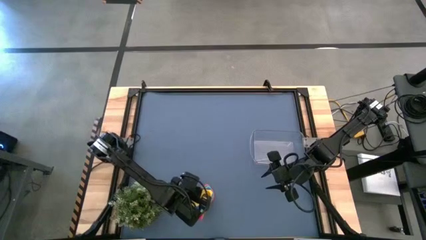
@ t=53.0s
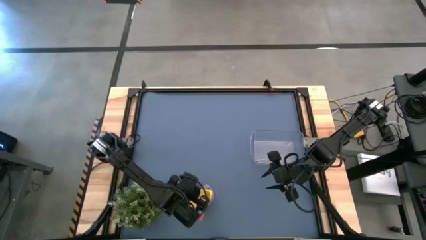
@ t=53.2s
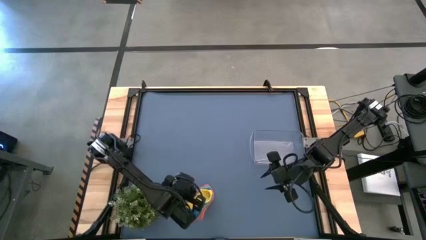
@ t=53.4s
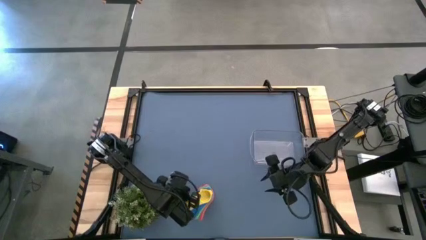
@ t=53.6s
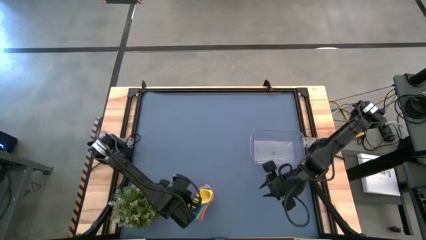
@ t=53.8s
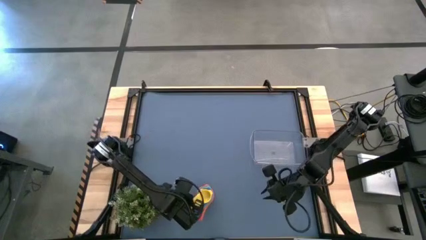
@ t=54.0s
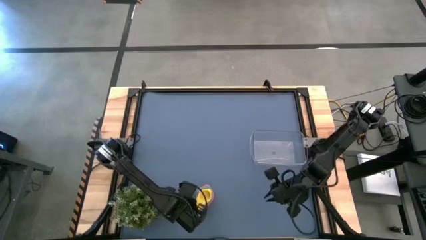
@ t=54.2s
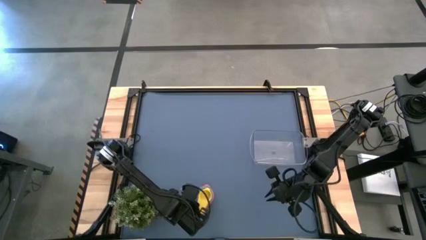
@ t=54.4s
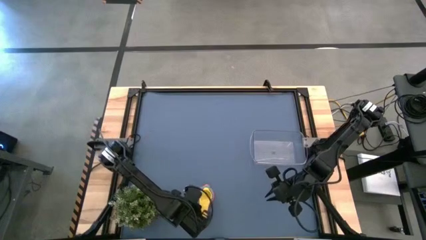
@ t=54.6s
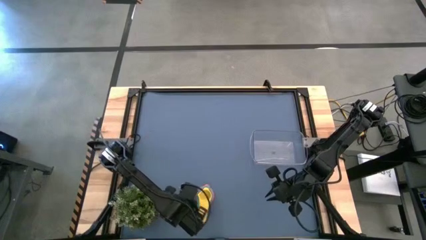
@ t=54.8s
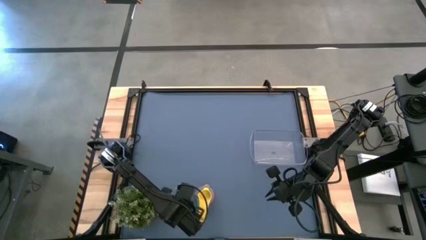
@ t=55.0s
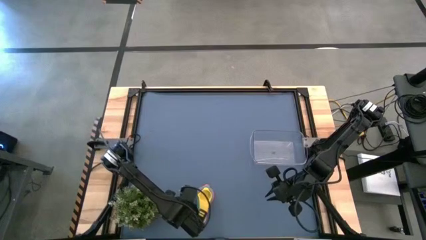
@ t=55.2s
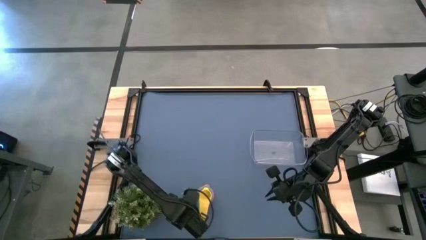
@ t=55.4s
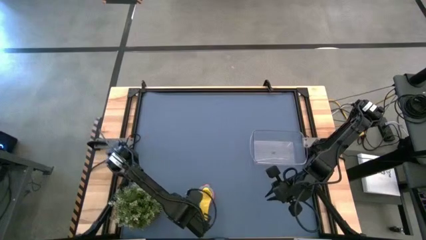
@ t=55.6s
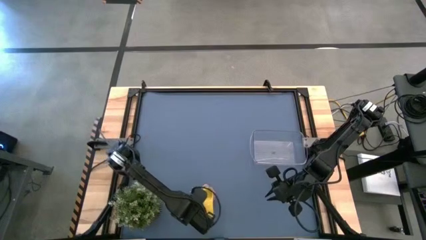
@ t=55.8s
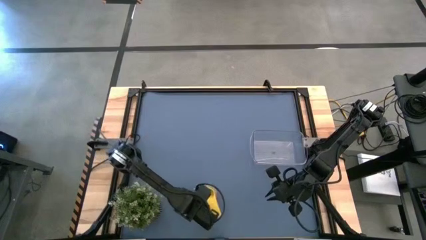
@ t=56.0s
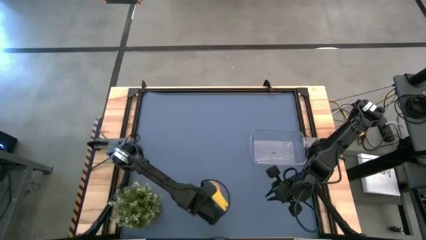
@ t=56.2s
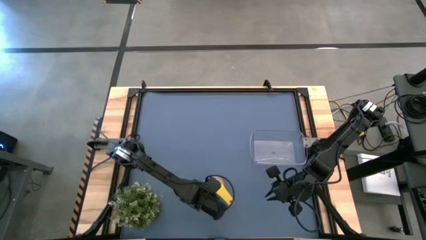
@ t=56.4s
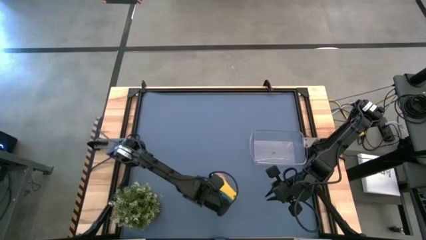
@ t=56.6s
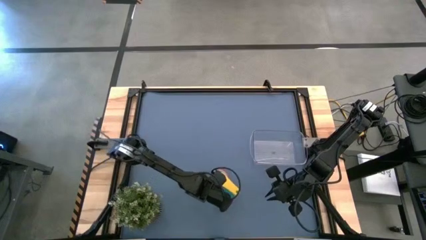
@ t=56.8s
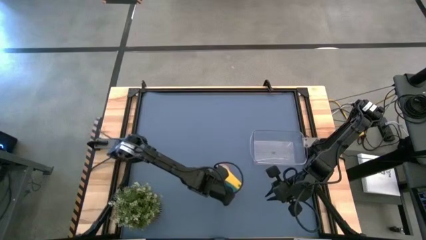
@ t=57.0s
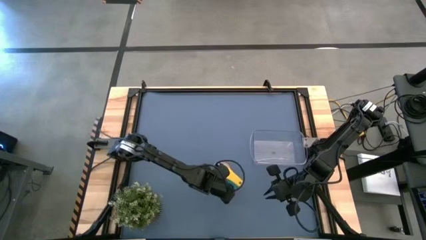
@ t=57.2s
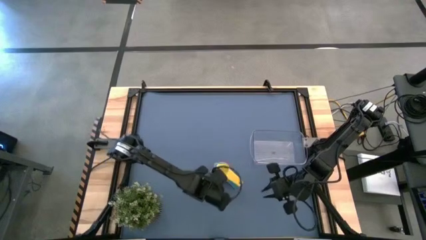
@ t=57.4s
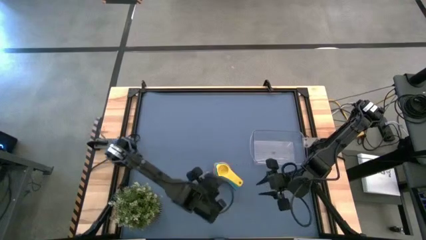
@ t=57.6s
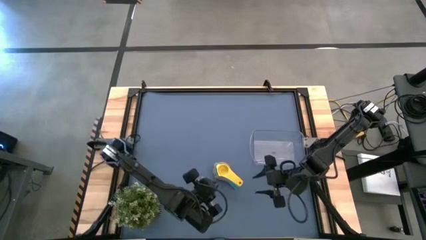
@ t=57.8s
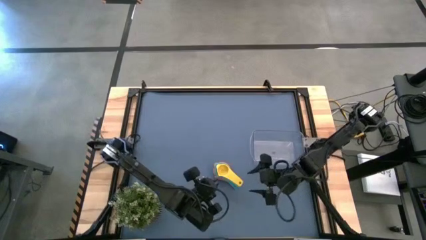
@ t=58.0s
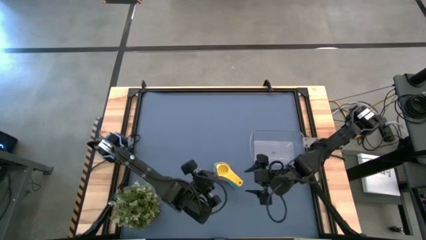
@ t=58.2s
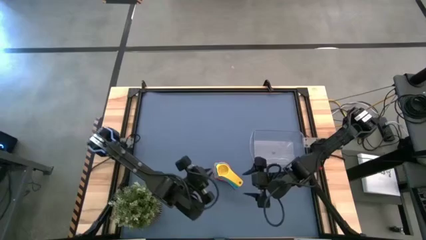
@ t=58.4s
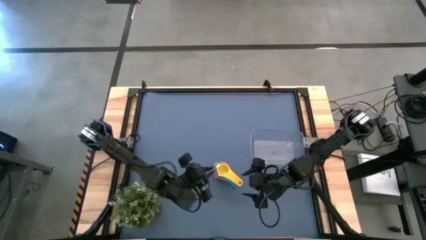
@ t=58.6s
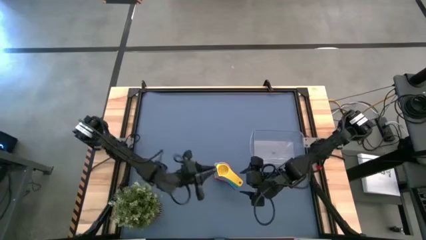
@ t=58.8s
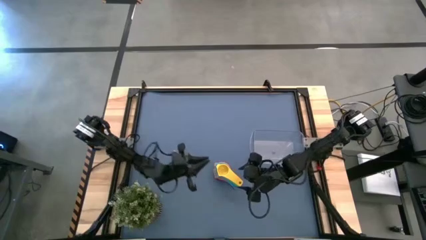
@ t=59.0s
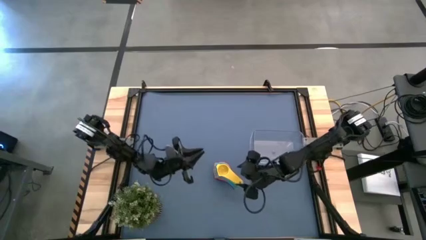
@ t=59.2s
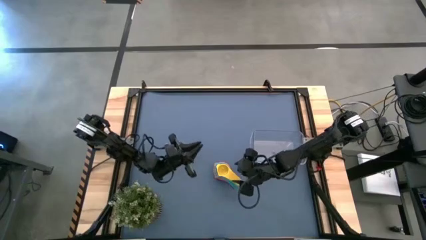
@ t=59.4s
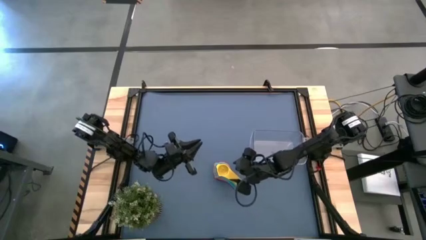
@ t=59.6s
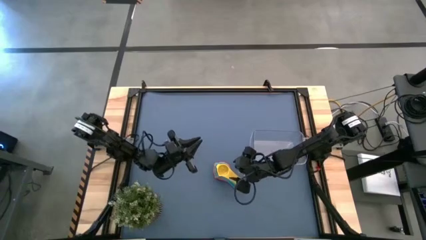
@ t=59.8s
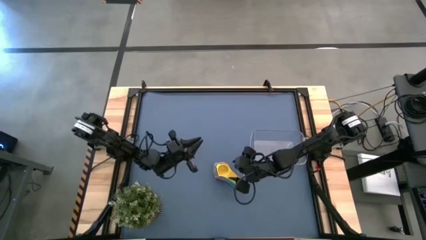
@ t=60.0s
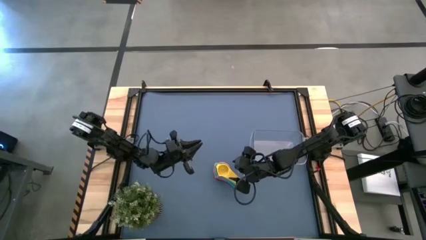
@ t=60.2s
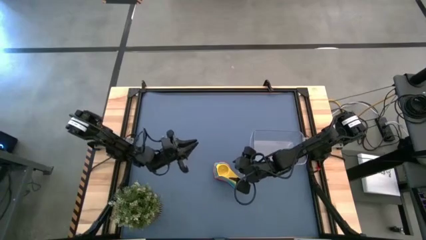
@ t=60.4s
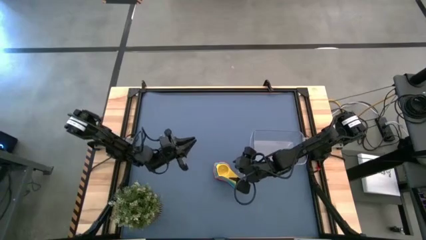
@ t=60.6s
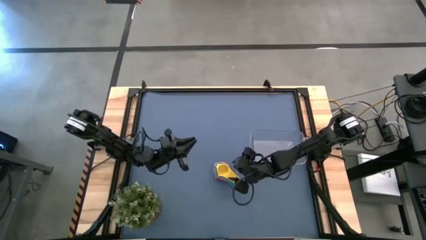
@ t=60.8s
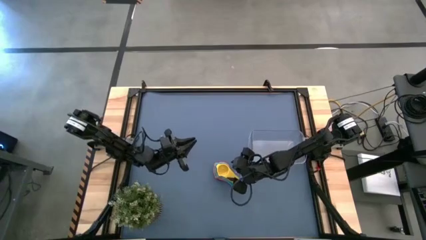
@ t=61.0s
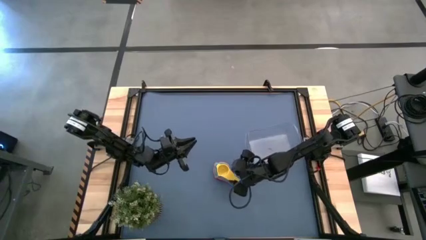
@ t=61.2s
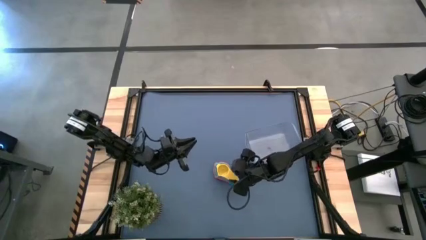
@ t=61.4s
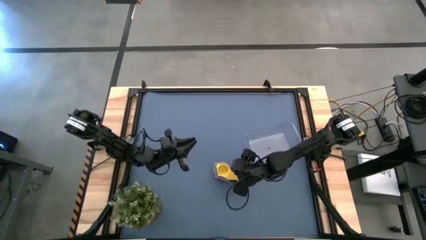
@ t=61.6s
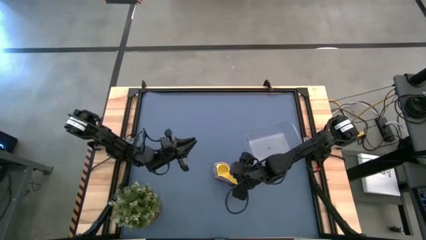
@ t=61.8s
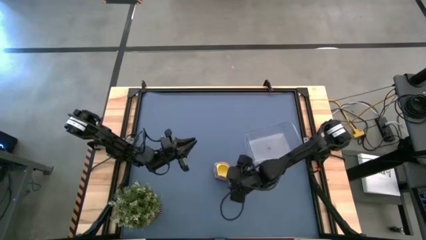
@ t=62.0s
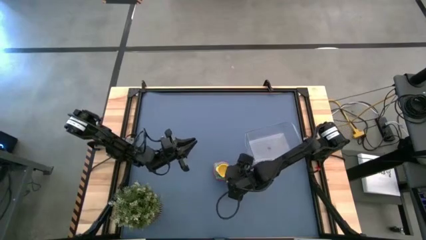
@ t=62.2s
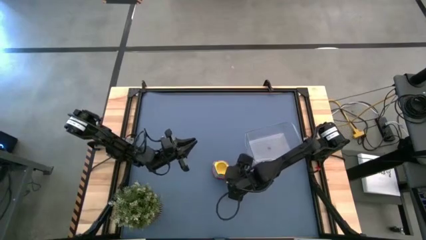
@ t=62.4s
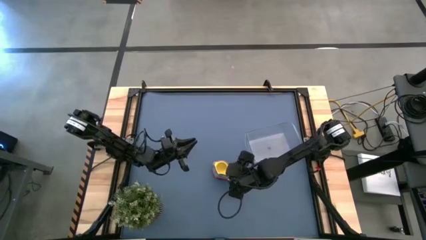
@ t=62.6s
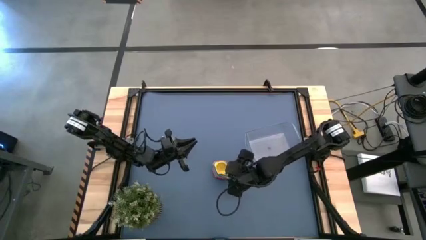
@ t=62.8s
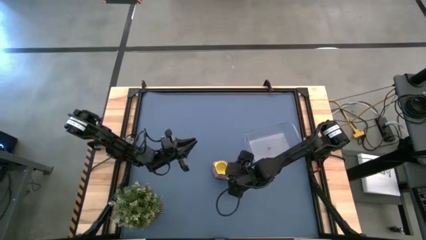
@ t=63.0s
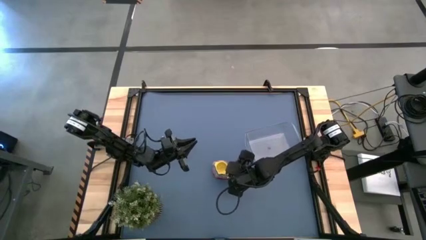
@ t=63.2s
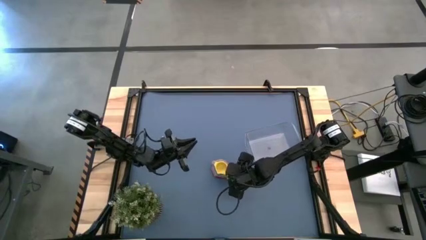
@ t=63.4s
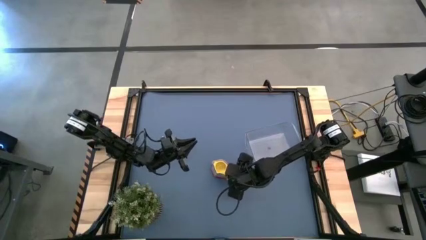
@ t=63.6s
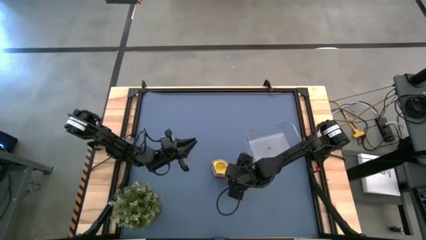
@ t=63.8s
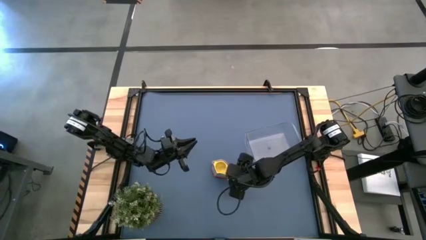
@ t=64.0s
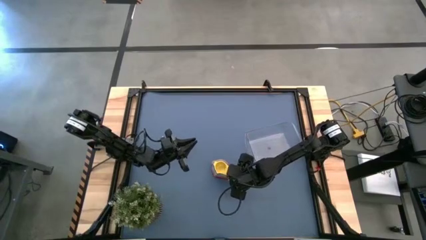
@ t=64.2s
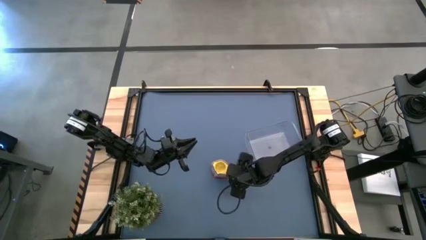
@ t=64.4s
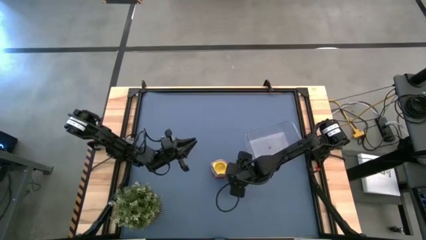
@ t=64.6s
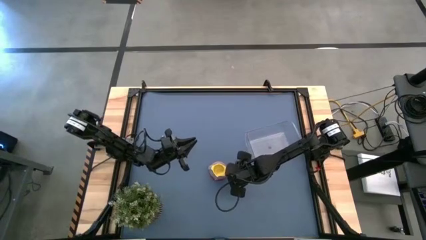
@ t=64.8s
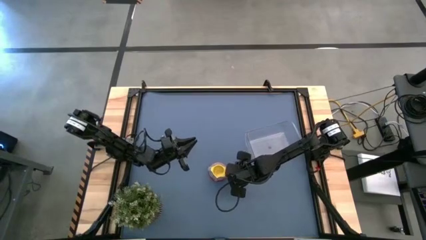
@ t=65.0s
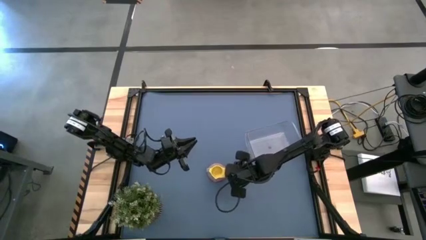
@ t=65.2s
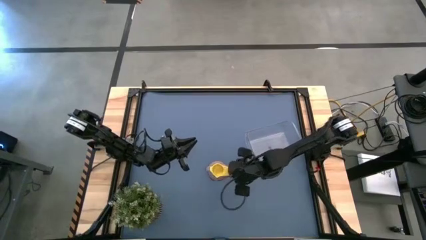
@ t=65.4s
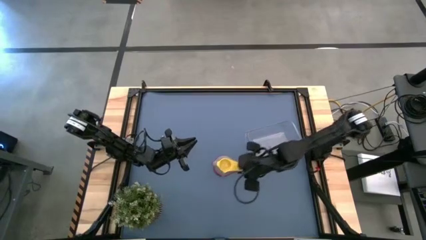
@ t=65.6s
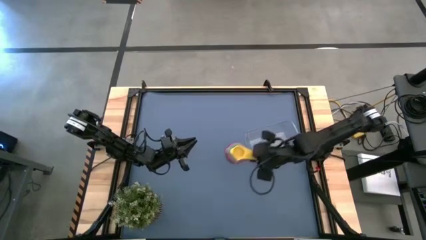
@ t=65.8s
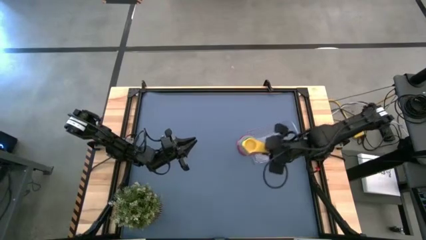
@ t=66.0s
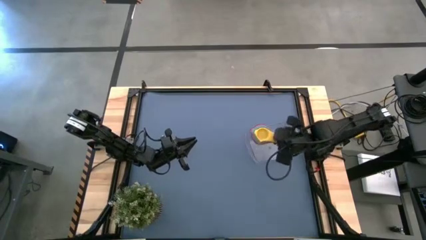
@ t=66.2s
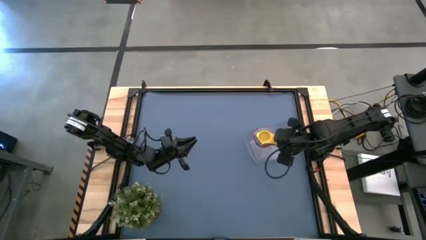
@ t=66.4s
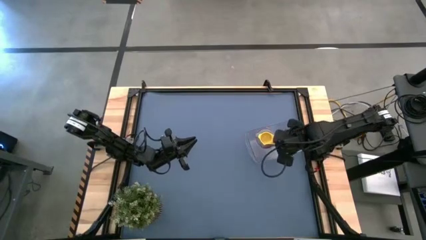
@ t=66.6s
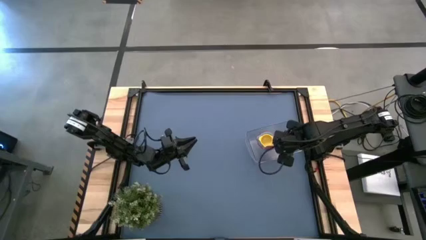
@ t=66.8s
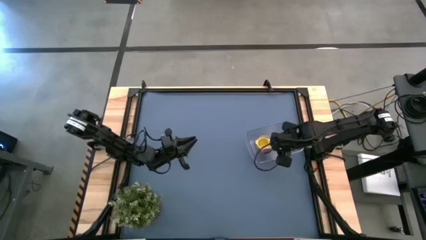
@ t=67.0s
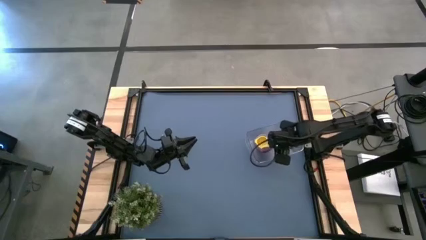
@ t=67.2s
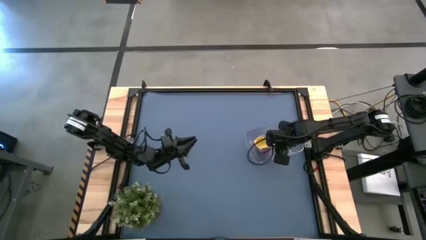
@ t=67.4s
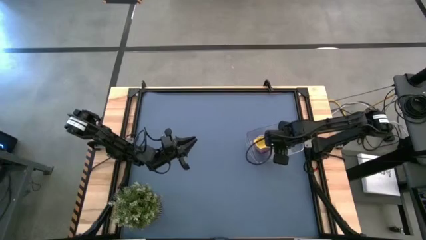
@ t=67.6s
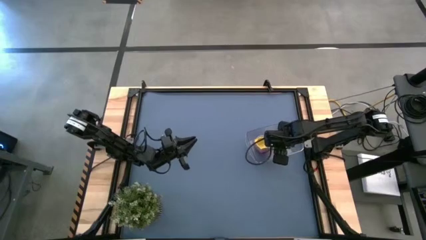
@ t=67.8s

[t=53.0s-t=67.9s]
Task: Nest measuring cups in basket
Put the stacked measuring cups into the transparent bin
